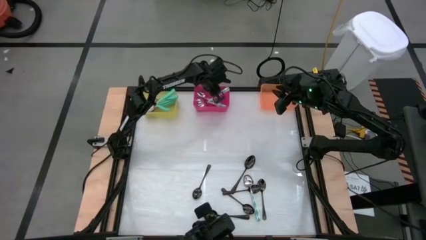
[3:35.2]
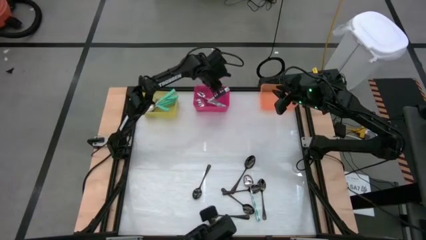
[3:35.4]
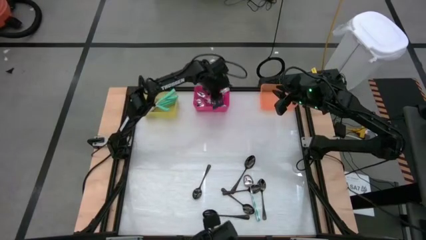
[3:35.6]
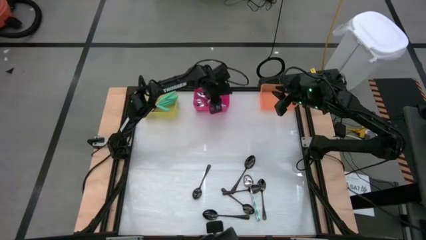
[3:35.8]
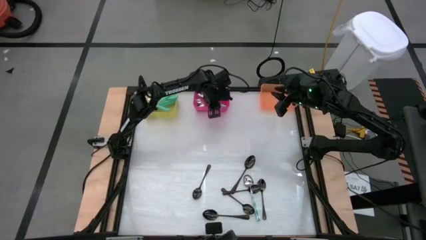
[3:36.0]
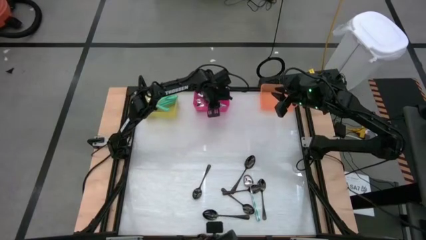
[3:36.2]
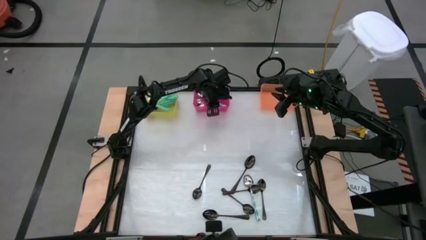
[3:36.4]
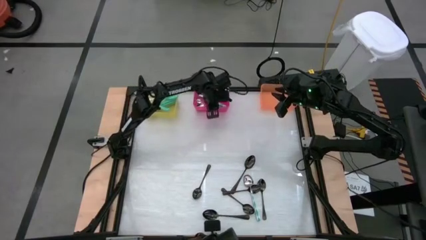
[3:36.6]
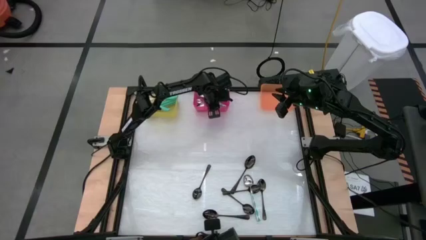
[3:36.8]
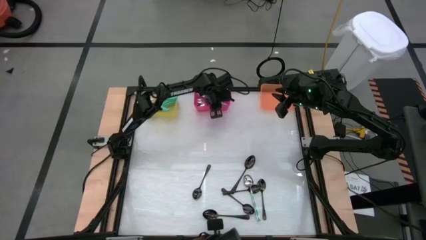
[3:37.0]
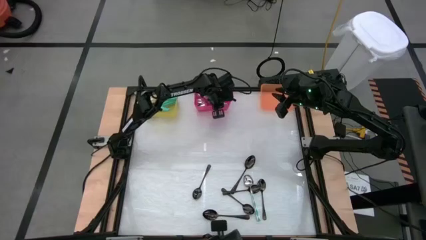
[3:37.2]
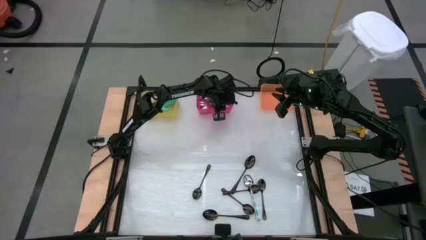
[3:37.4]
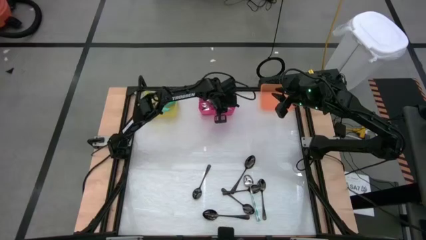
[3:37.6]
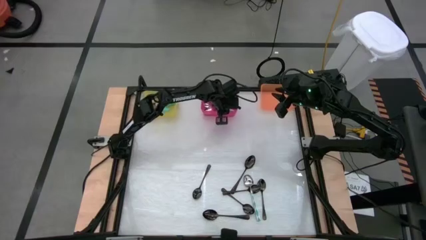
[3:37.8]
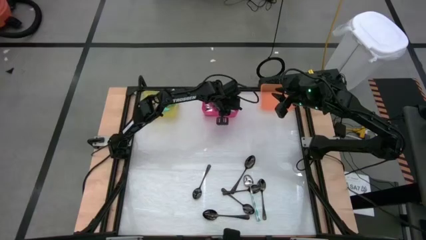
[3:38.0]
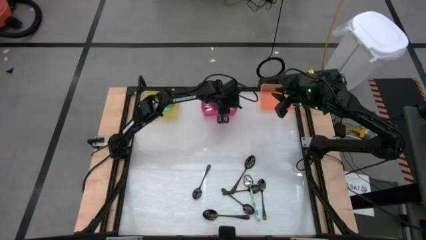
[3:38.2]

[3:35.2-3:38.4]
Task: Sort silverware by color (type)
Adjust the pink bin

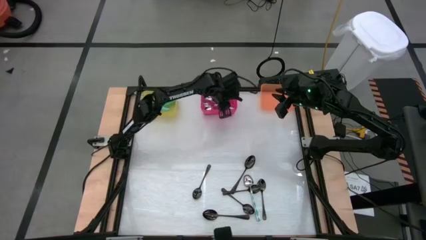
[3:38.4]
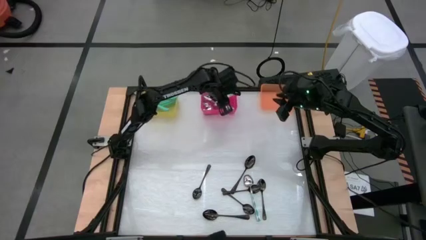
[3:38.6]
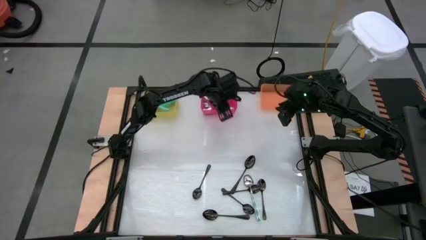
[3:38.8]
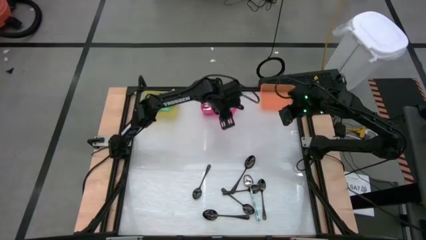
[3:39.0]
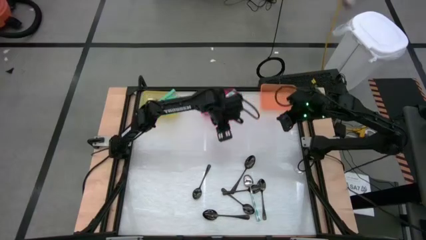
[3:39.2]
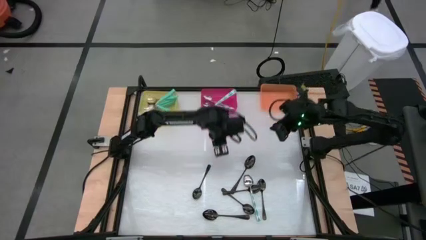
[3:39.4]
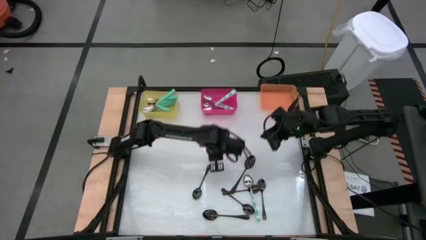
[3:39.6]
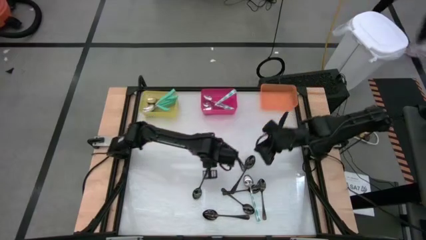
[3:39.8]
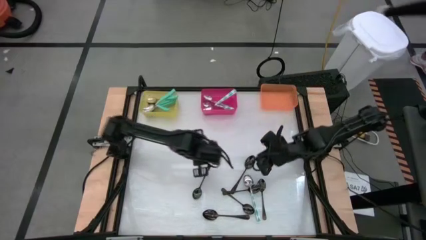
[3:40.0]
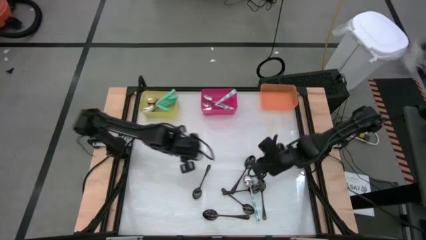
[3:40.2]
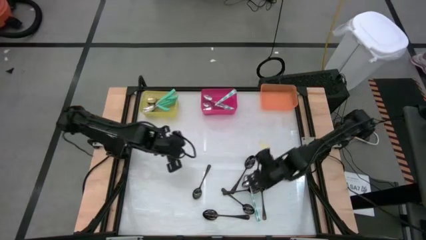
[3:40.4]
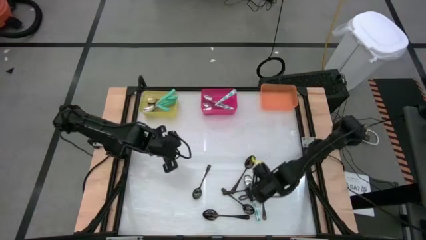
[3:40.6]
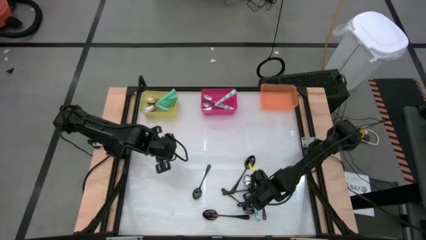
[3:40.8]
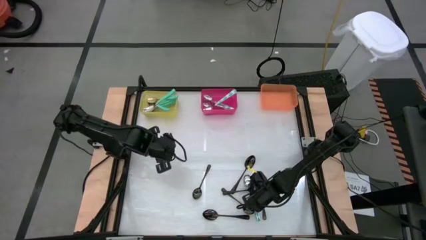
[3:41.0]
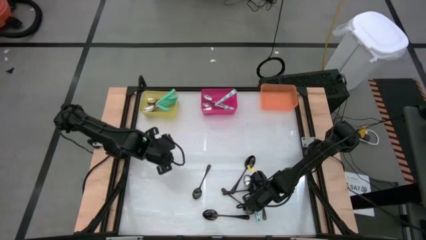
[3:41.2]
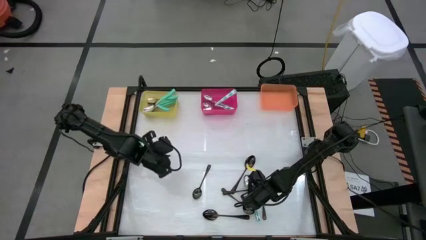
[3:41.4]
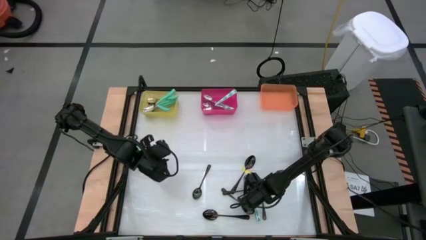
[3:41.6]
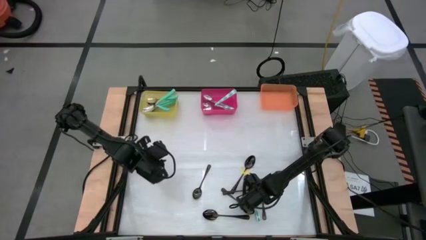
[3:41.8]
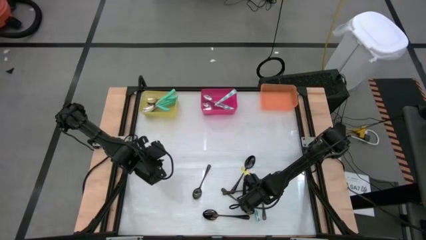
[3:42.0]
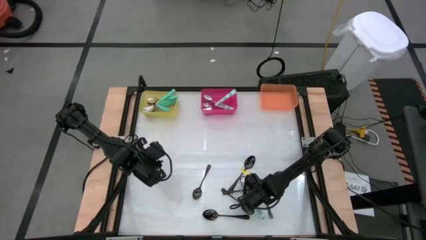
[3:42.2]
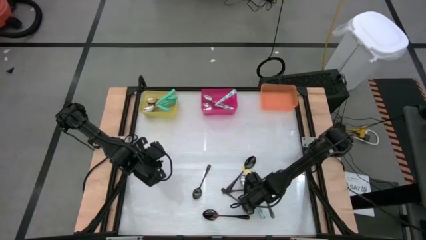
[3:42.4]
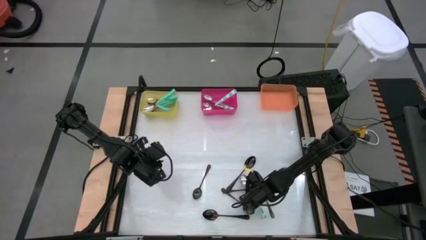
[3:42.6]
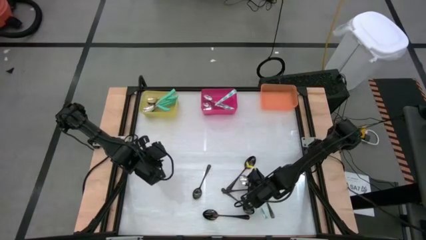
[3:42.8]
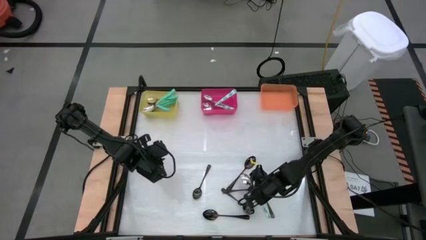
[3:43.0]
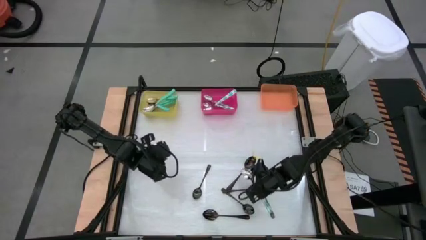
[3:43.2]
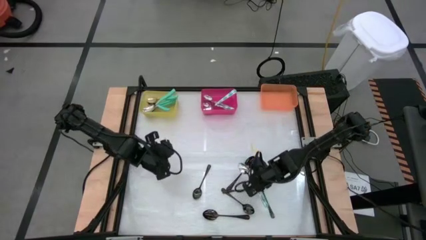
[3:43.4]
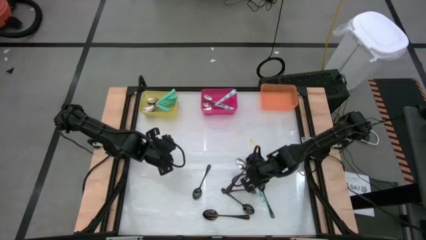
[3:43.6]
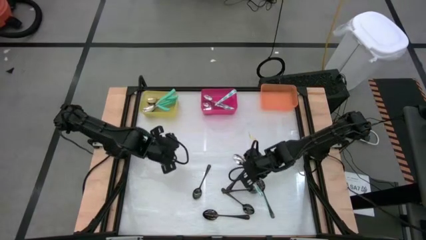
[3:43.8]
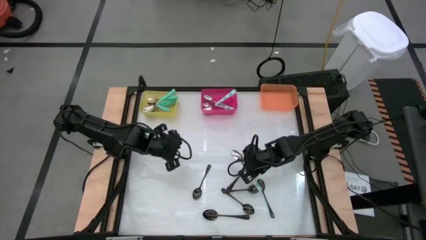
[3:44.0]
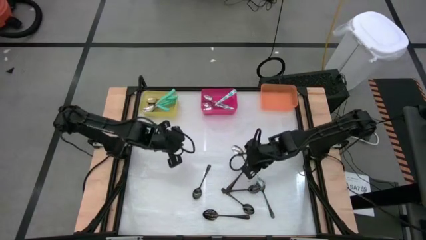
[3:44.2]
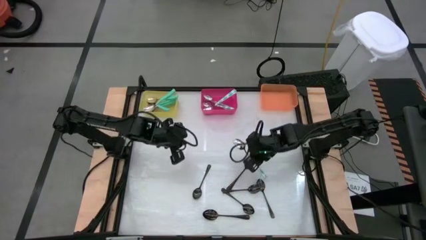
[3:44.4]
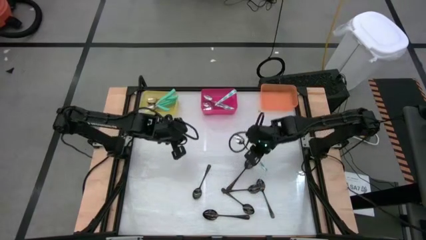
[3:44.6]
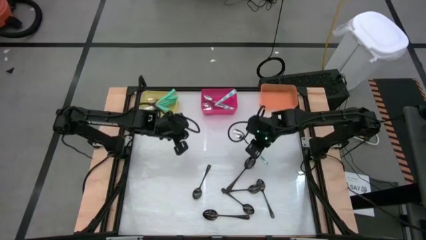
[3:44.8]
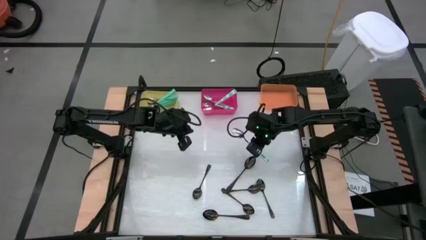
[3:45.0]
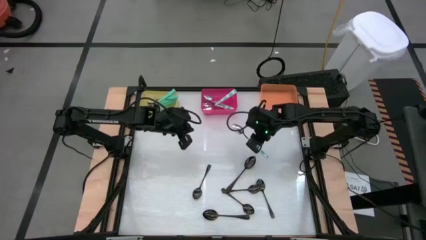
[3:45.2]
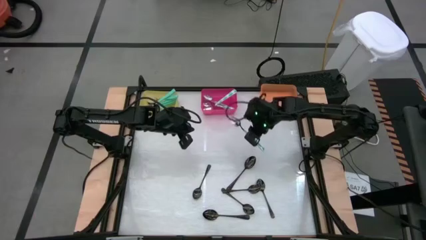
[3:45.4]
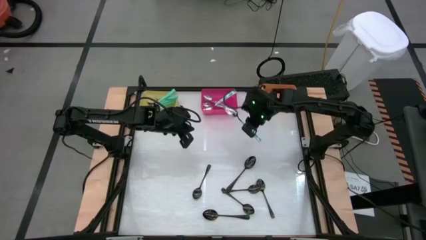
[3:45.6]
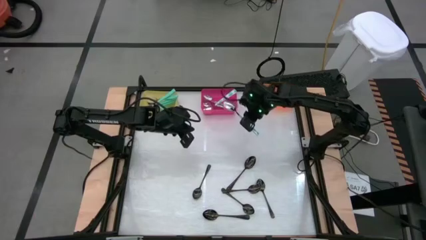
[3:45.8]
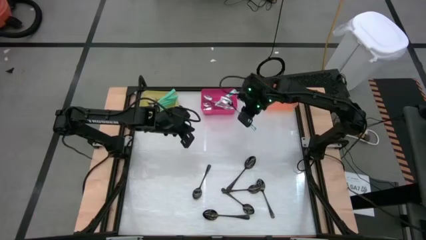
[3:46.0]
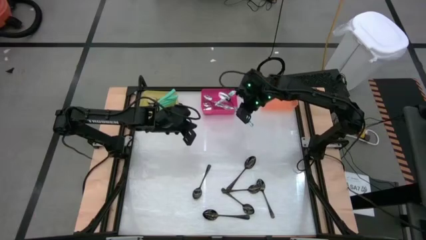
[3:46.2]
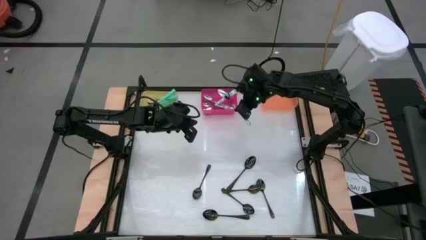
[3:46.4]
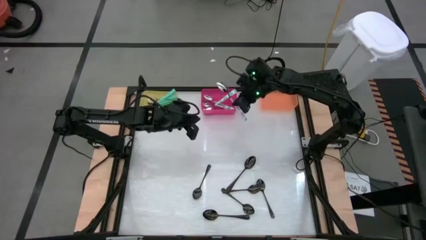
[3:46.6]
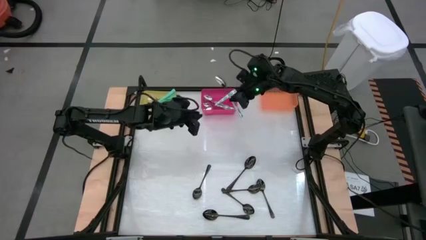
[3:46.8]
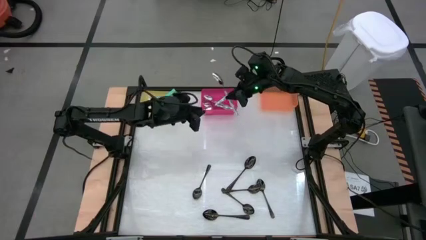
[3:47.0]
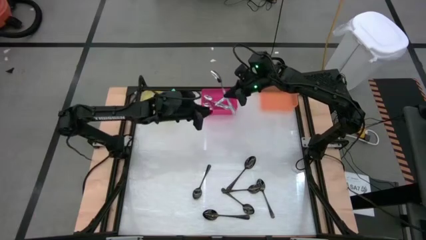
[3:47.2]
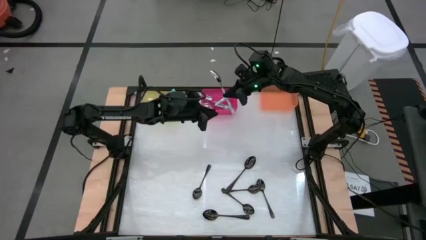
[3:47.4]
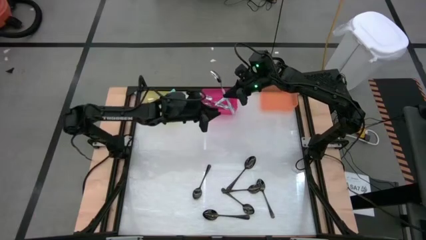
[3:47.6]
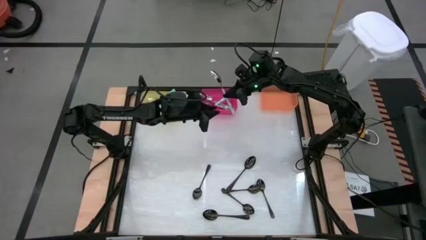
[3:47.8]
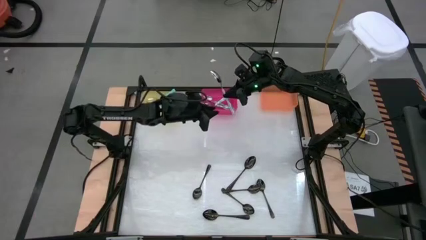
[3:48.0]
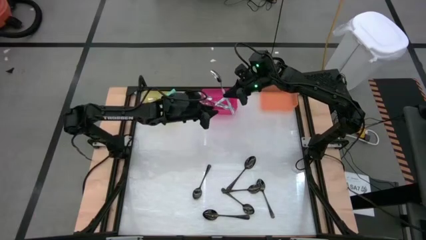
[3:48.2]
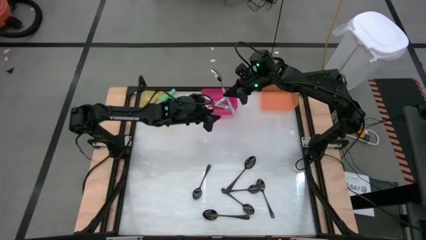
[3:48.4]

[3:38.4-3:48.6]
Put the white patterned spoon into the pink bin
